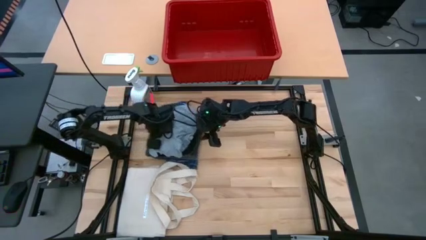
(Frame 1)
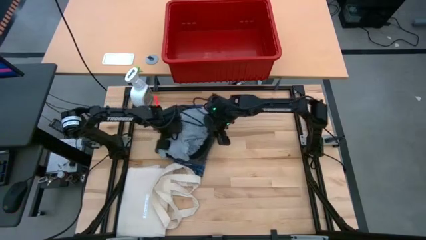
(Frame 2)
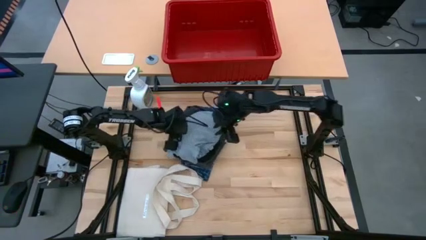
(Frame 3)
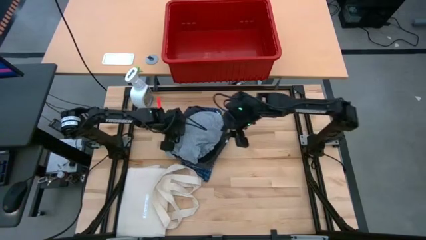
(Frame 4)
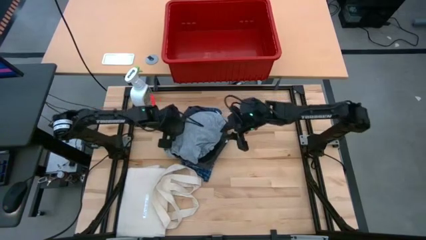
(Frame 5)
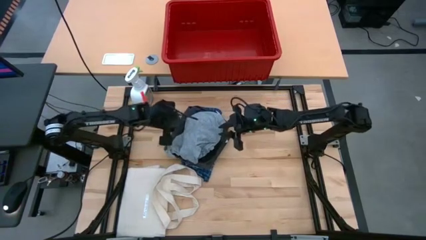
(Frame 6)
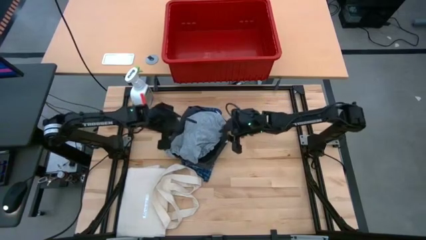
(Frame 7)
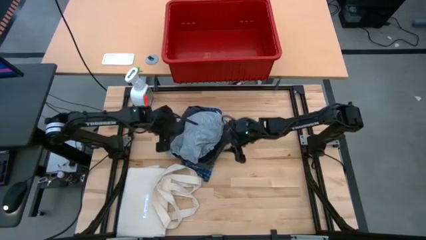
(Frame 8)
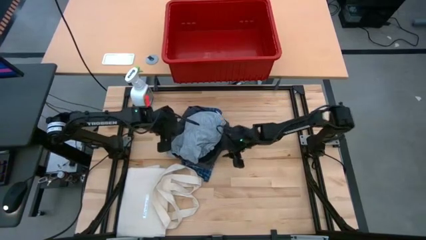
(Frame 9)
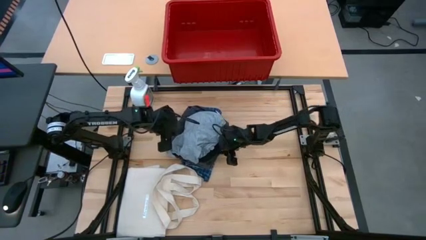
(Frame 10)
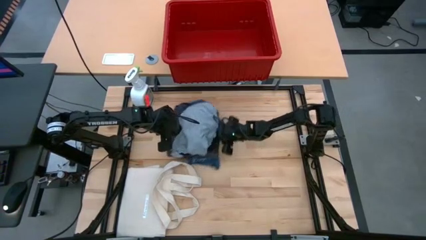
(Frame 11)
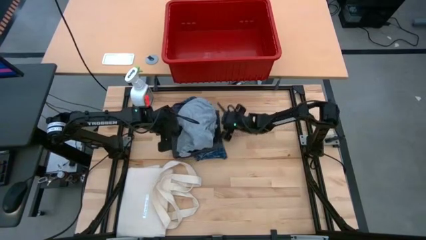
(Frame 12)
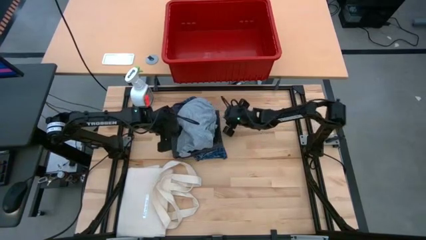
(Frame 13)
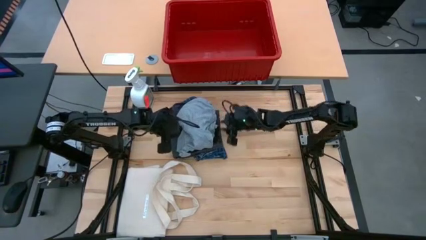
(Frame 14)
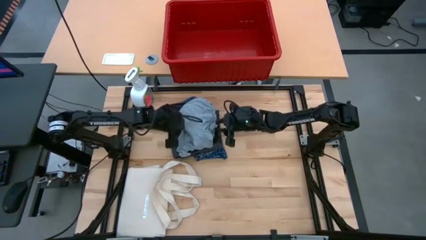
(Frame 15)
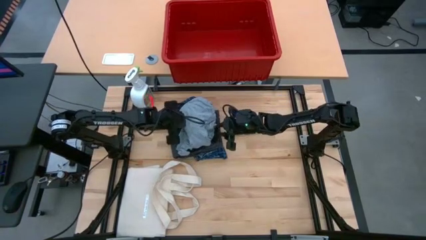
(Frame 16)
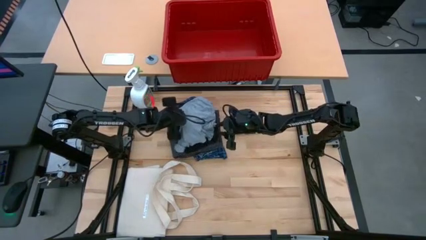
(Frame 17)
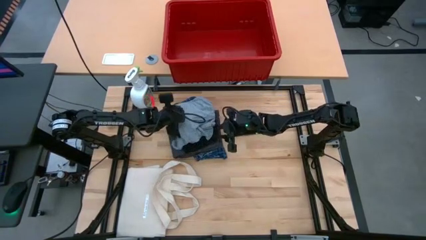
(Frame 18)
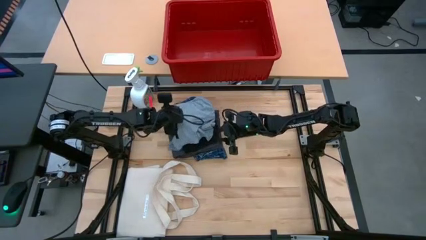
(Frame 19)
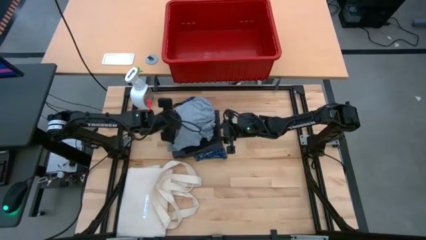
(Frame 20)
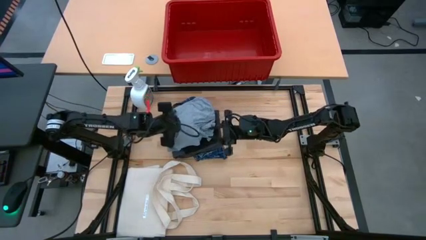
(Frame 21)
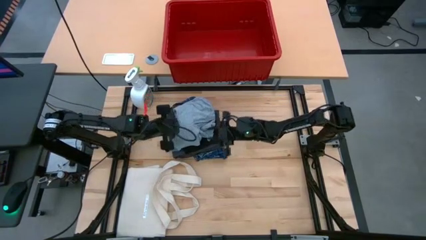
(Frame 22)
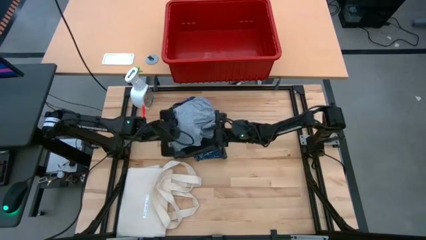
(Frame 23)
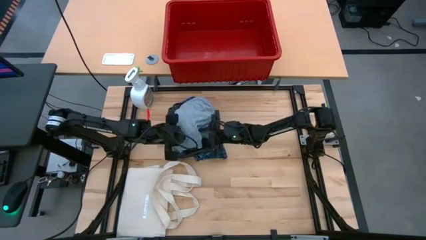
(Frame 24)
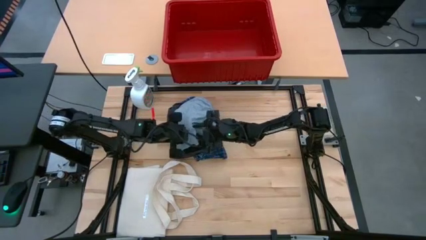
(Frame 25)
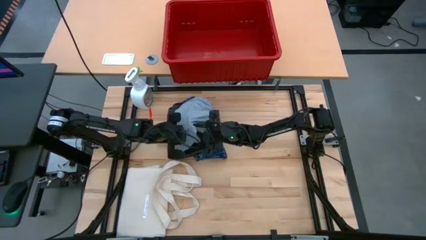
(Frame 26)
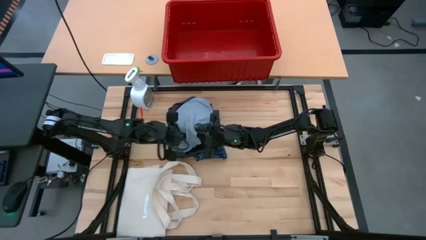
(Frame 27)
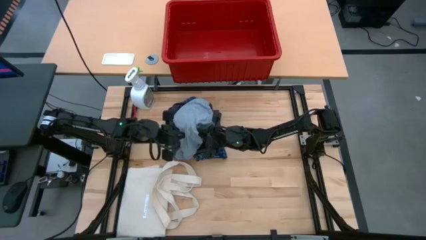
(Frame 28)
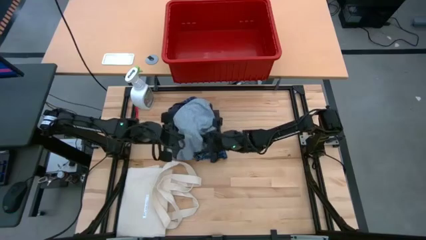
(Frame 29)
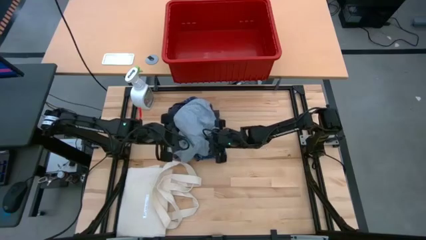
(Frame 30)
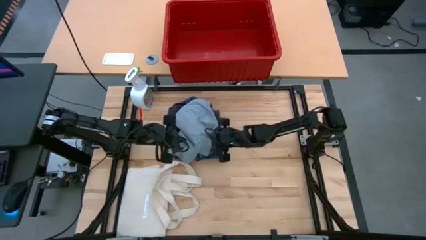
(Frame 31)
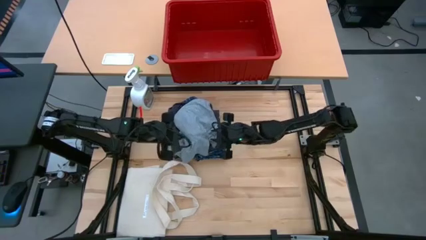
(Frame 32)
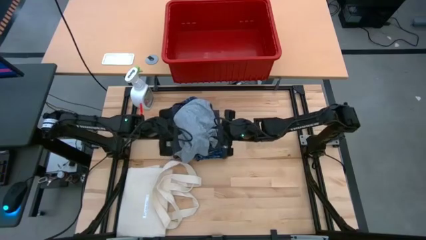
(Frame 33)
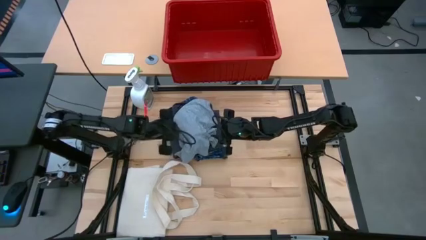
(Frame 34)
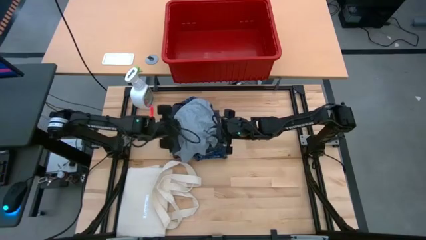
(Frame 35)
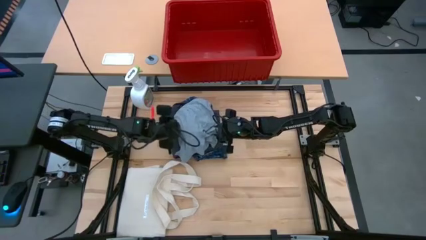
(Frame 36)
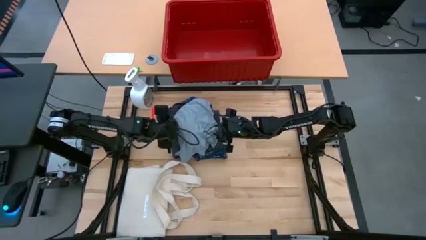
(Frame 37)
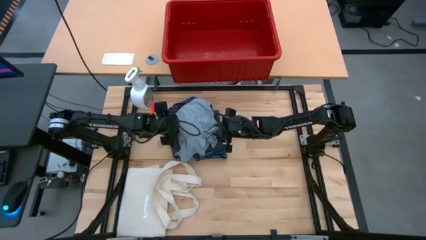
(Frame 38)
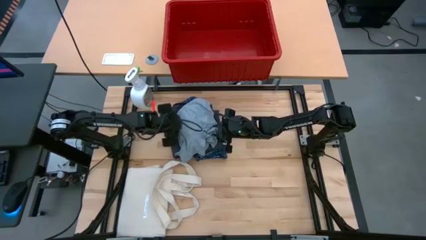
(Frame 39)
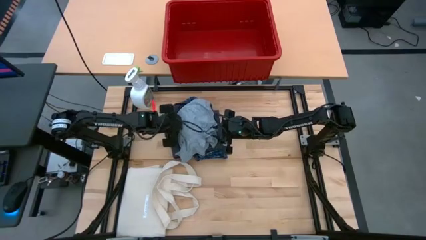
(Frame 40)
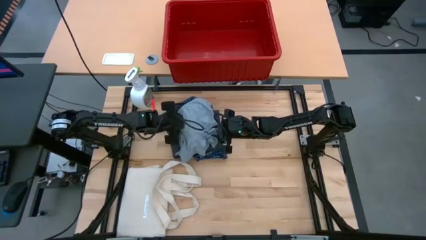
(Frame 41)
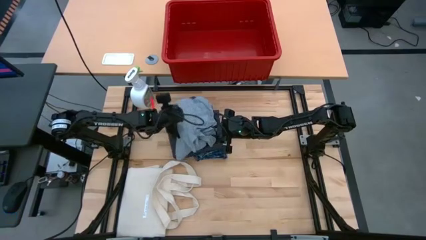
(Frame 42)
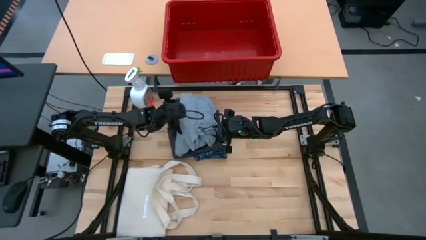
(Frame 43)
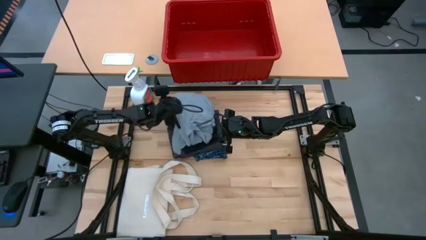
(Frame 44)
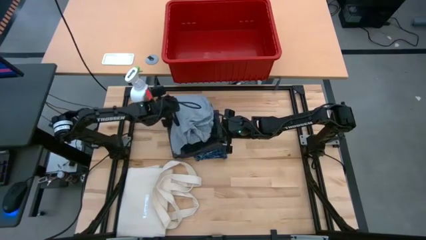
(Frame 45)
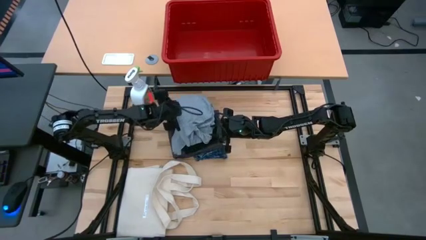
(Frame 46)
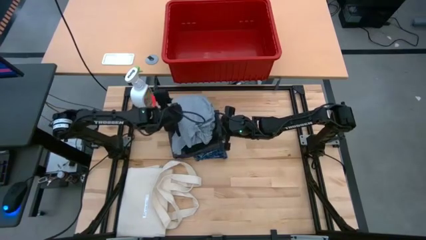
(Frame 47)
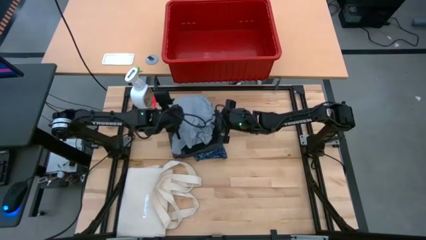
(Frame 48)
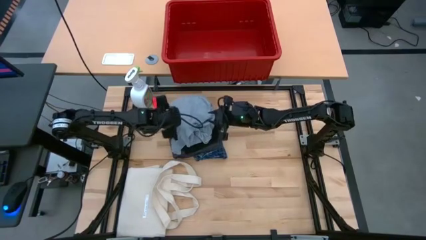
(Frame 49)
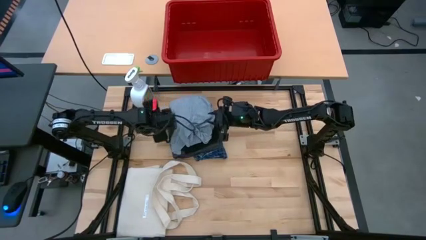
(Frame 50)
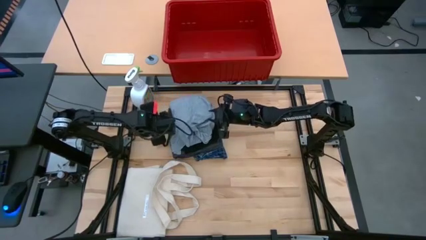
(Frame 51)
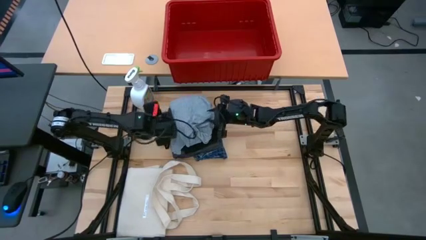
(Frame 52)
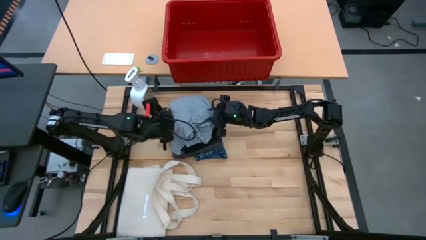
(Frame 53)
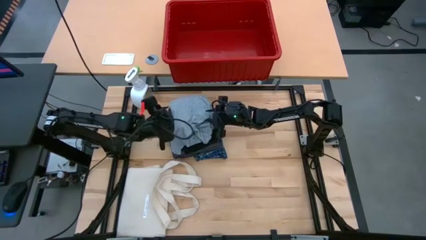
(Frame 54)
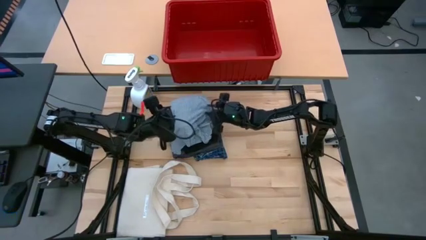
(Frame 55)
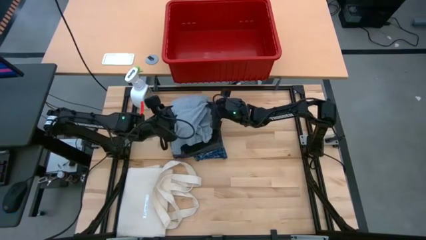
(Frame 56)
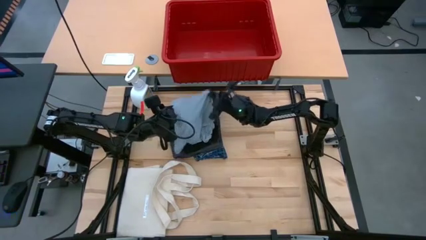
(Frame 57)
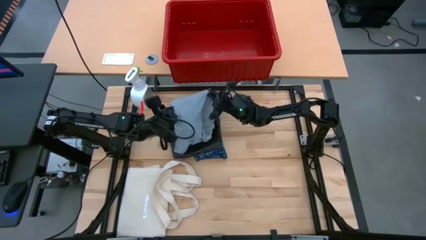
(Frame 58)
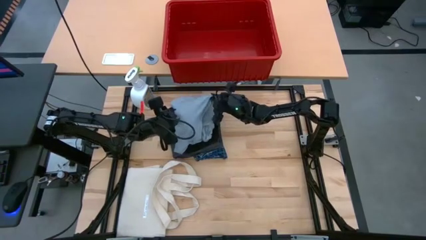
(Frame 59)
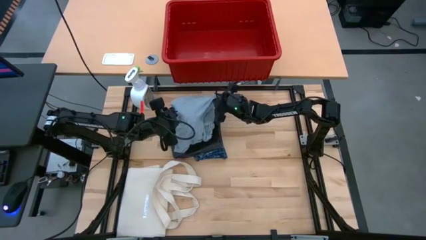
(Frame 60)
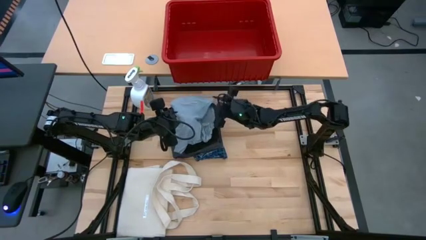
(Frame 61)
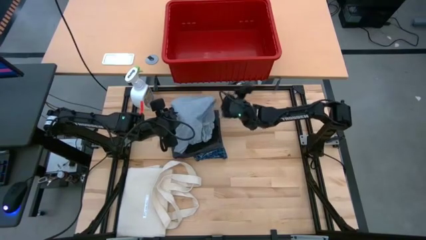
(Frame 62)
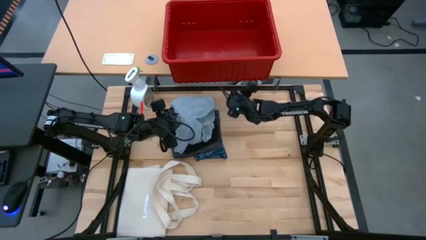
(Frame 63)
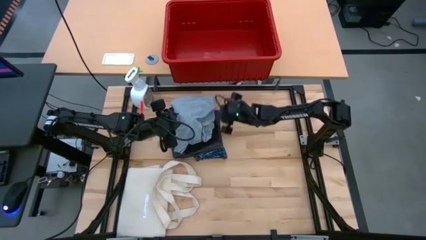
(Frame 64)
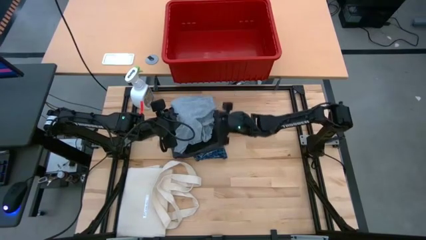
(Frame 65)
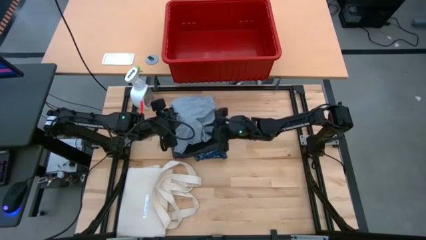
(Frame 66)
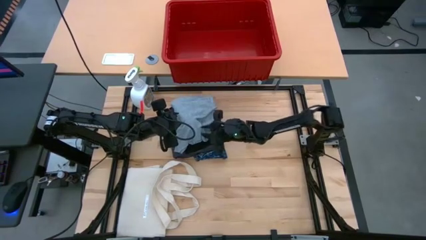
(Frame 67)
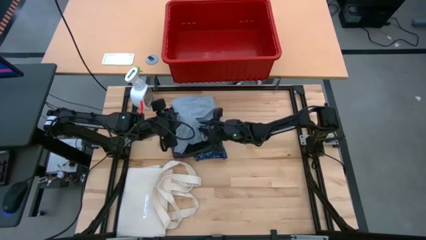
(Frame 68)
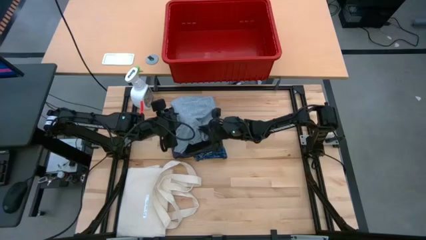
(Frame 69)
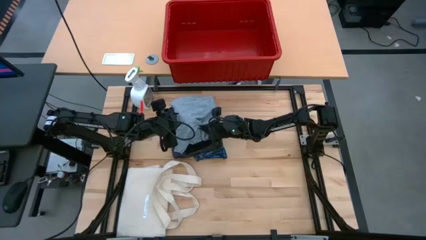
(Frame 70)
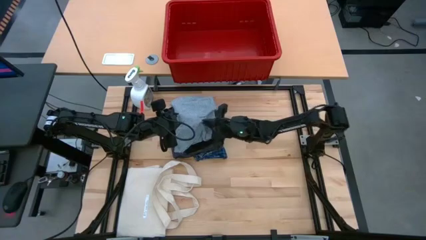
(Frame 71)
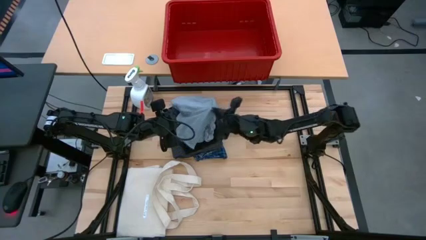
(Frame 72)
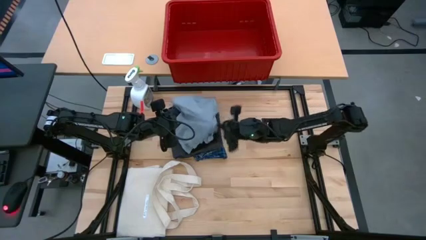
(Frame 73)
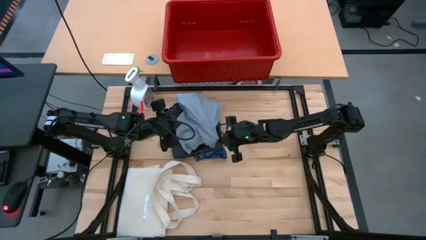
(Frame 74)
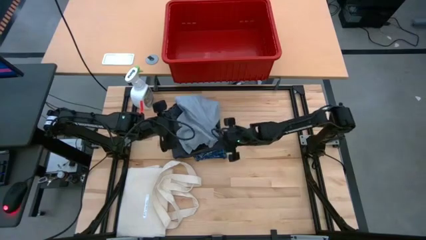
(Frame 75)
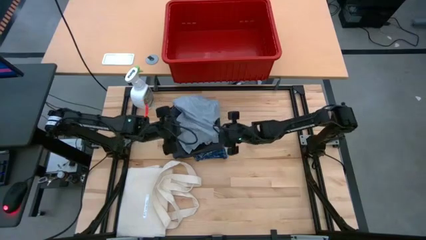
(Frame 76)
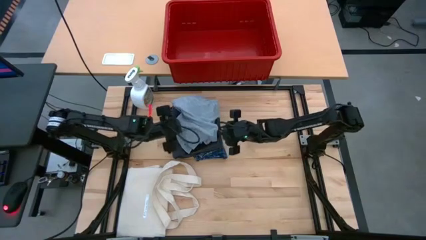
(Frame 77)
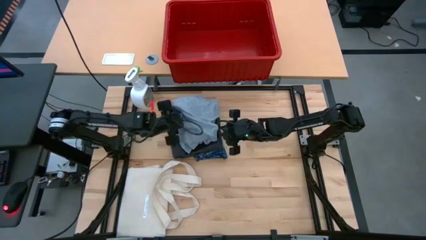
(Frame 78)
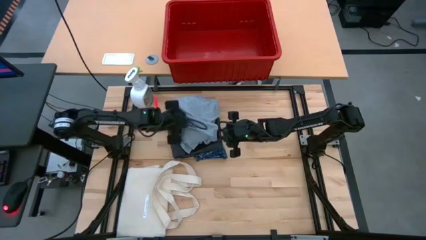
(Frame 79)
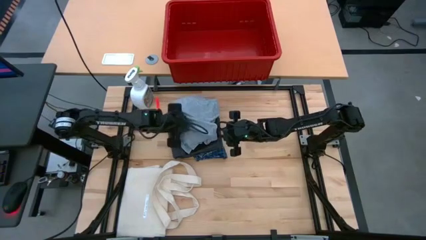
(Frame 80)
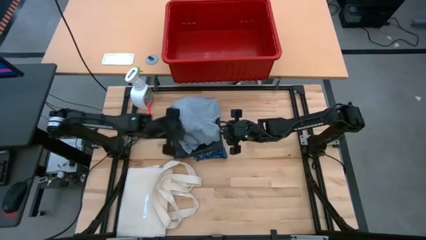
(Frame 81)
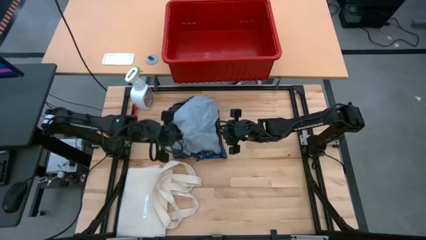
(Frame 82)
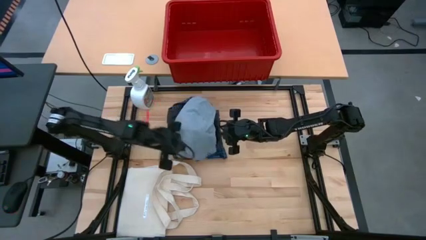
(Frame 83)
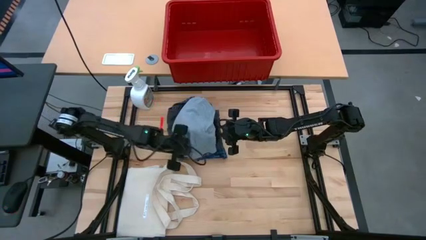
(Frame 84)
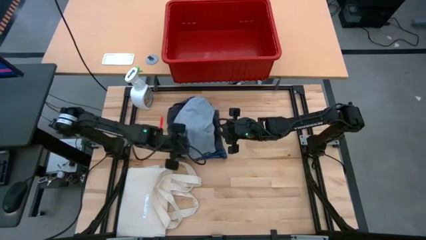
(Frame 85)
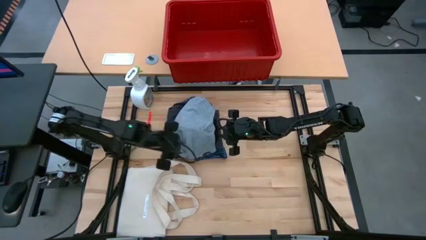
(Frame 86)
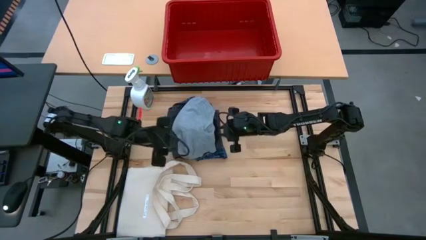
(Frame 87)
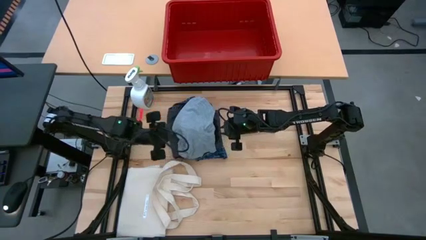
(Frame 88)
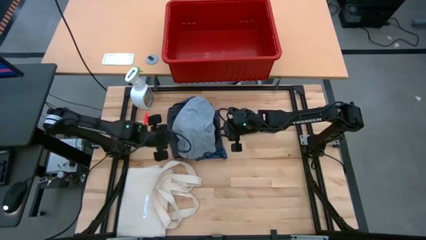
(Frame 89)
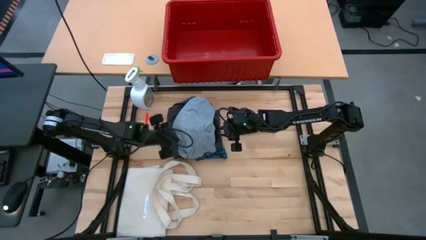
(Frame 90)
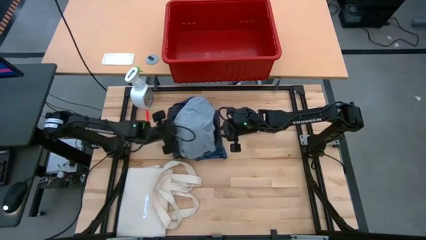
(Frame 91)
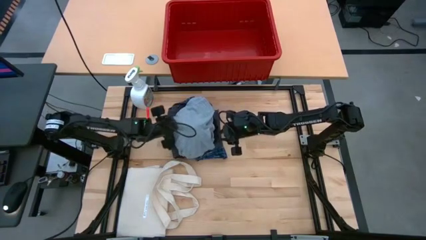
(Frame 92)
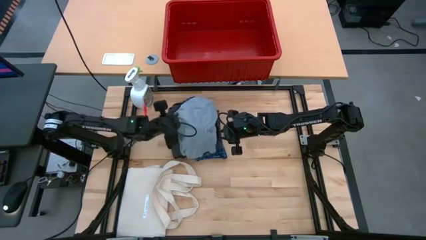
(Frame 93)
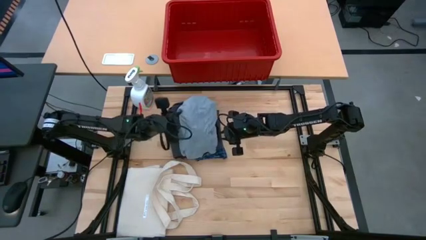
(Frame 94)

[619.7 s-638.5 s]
Task: Fold Laundry from Bin
Fold the gray shirt
